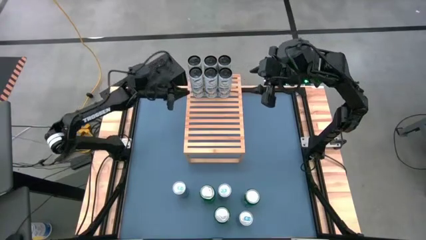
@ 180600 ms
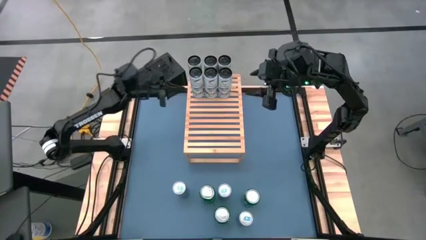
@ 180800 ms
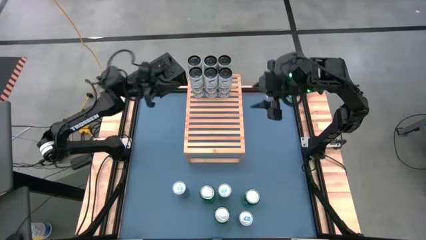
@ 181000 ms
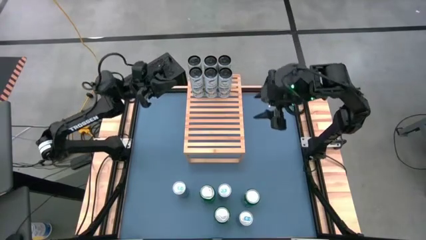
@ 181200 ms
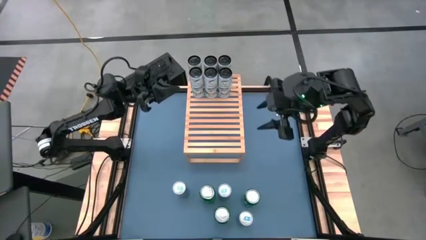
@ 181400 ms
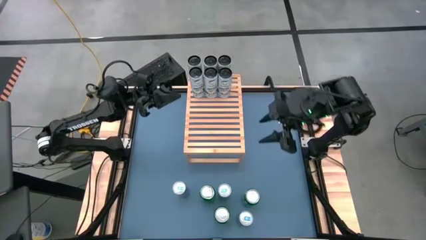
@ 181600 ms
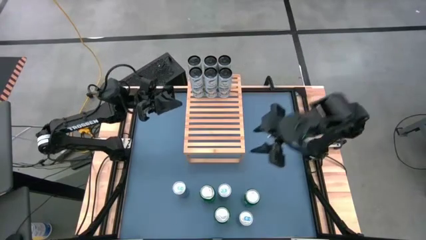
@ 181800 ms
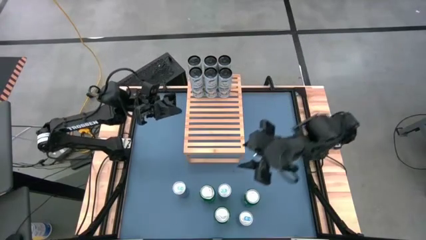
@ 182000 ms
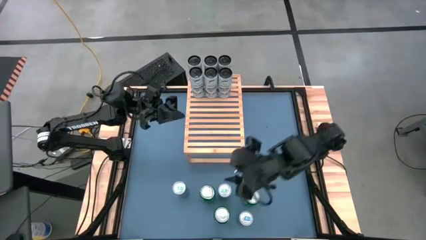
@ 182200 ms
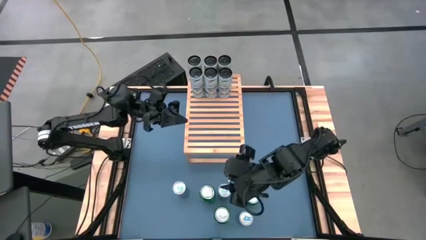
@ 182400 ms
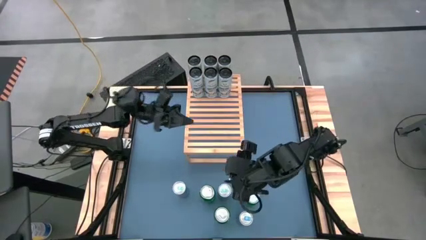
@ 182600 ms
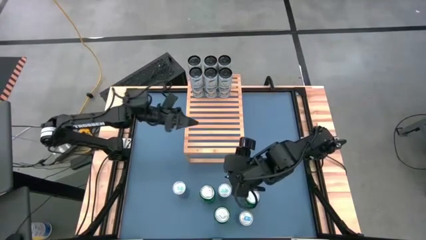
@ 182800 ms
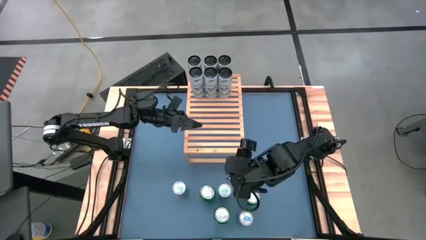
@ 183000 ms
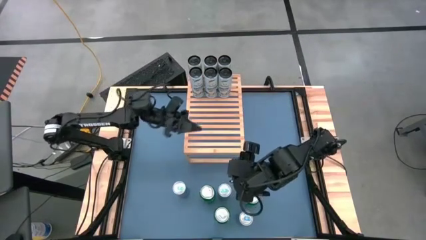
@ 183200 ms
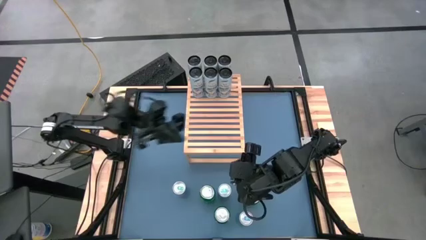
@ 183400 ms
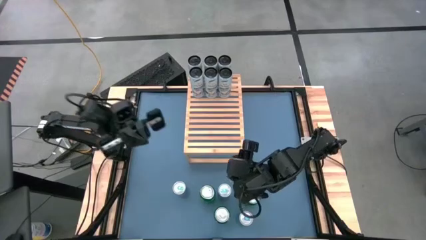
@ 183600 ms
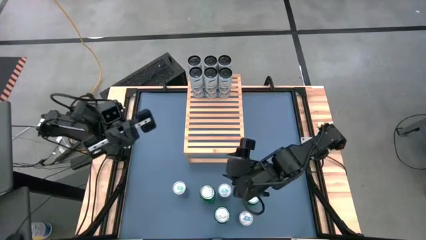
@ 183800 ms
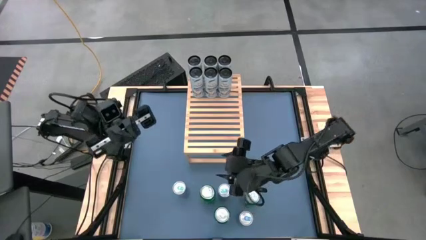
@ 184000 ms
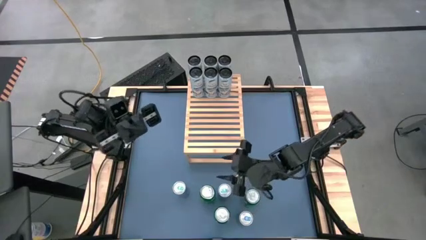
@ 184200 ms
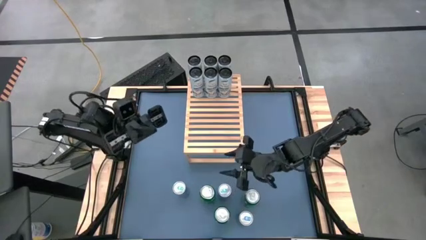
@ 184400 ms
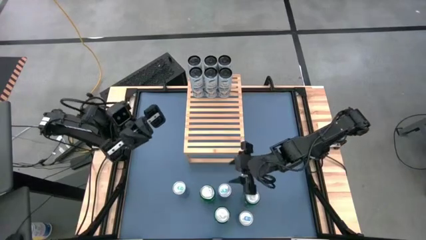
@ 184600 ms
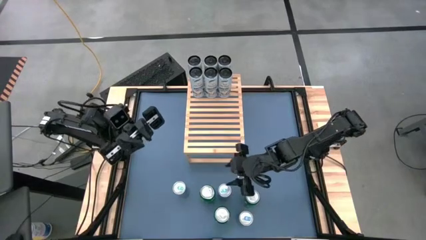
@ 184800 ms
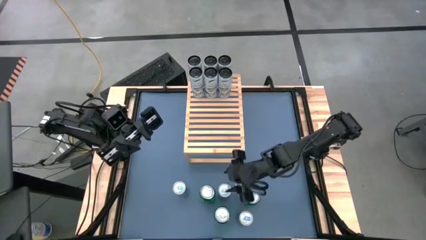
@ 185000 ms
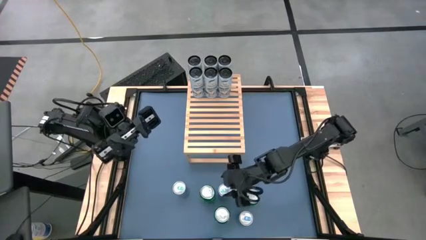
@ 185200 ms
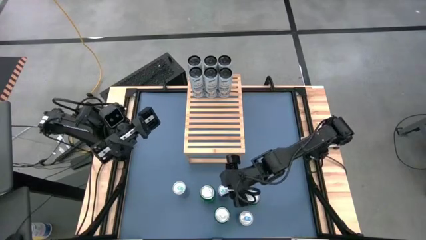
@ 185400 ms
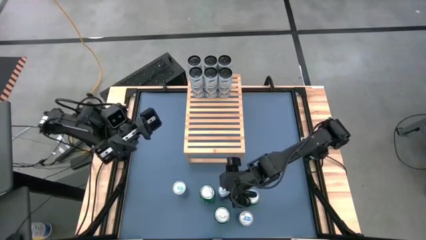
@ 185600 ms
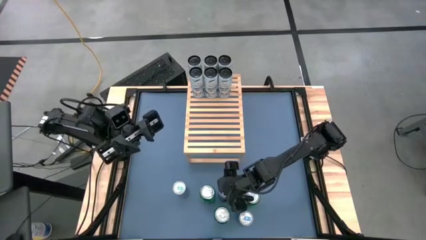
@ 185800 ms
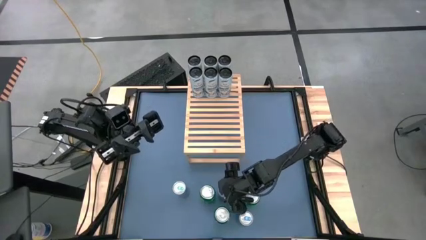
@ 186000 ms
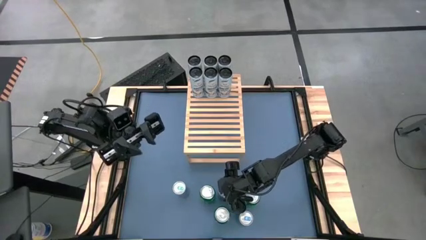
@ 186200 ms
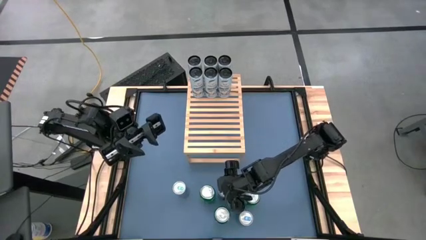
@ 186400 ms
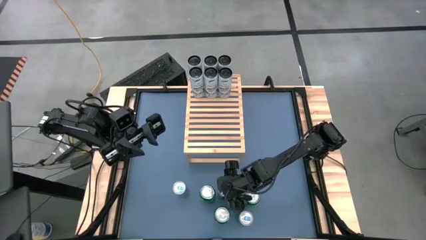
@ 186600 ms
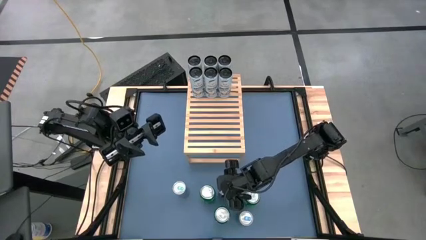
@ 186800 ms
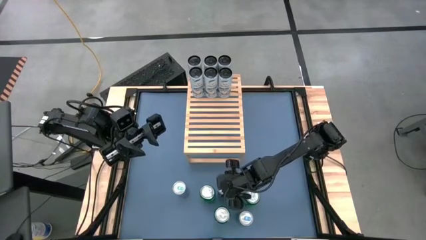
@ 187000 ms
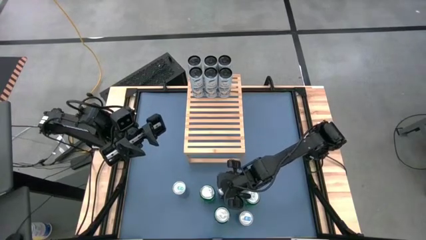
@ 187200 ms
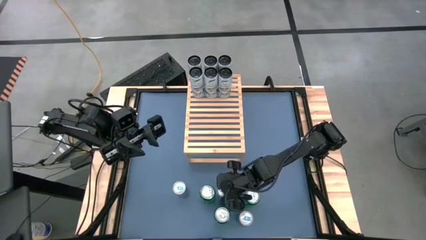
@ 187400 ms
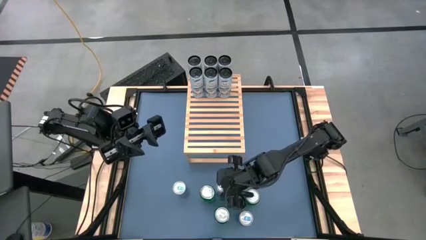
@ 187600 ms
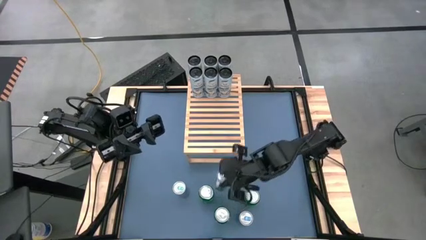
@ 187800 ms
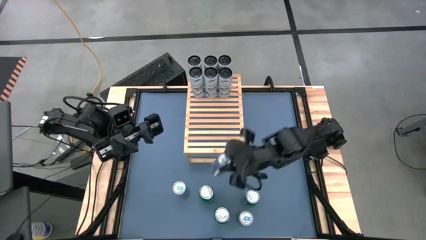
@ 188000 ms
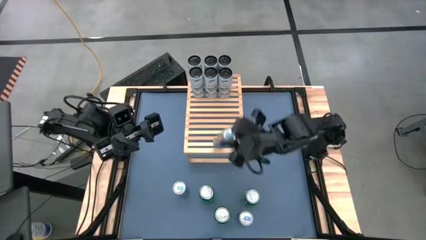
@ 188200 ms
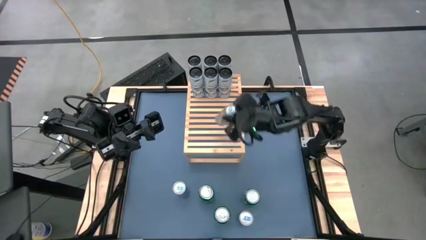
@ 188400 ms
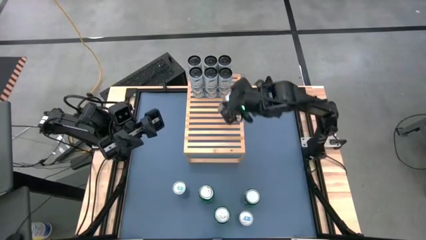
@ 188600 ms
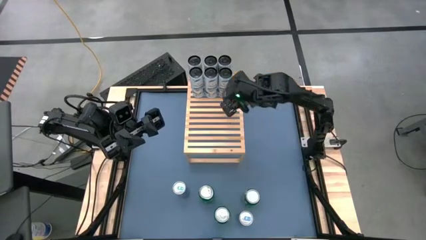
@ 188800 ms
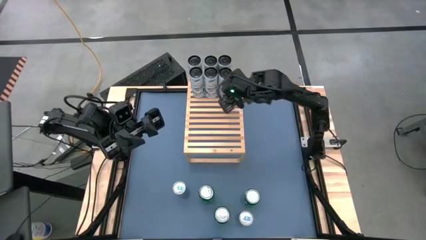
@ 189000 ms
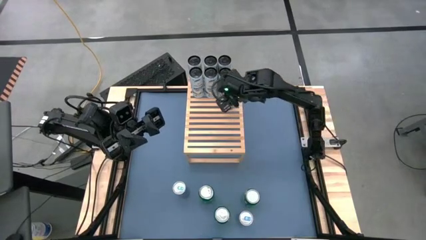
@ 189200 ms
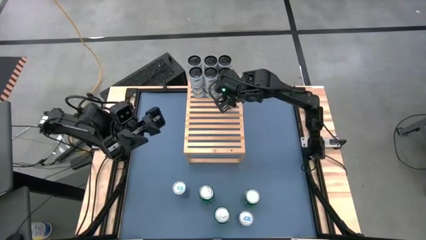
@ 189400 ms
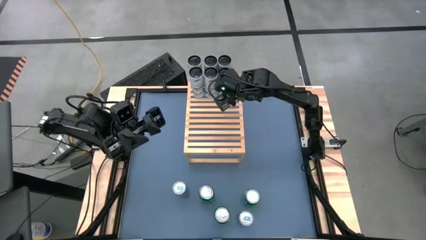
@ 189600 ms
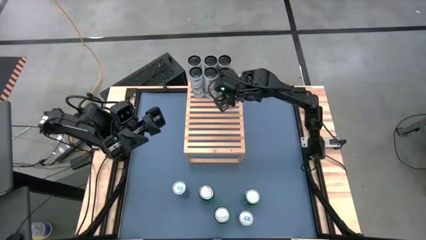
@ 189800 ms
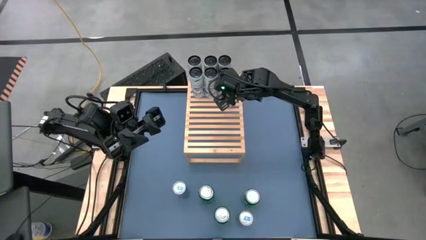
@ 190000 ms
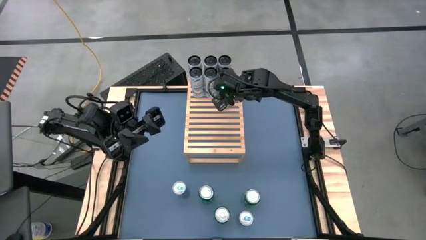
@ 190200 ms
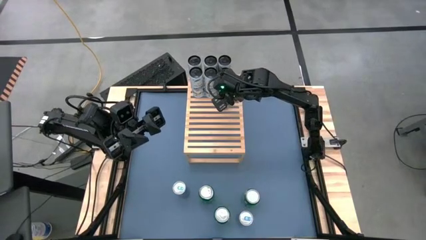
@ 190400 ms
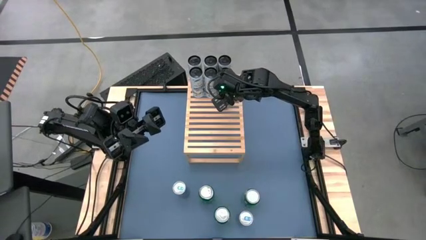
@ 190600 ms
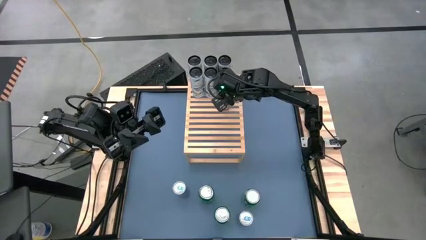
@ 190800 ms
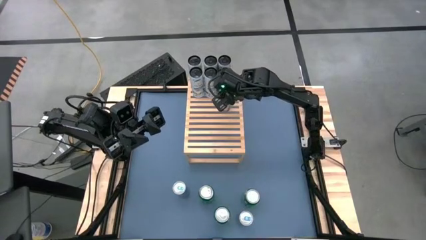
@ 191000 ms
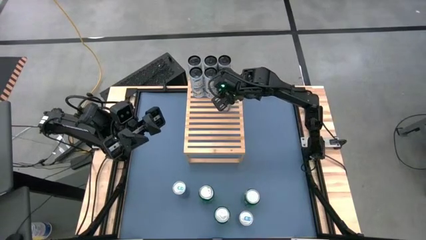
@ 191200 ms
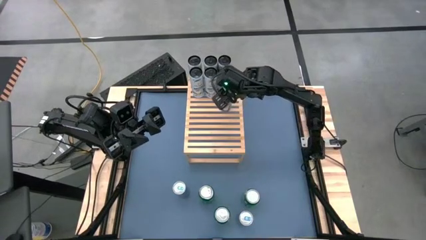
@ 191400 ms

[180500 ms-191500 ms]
Task: Place canned beverage on shelf
Put the blue soda can on the shelf

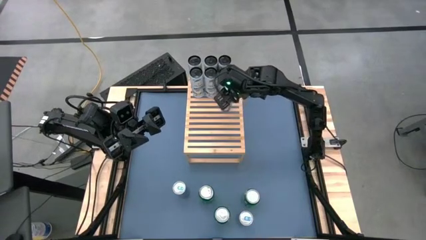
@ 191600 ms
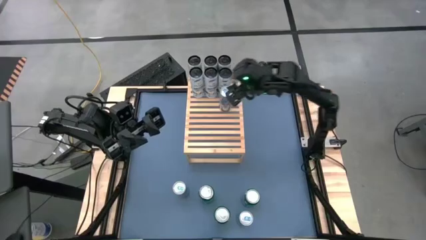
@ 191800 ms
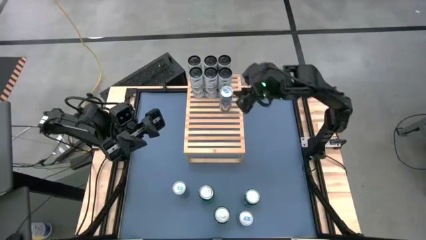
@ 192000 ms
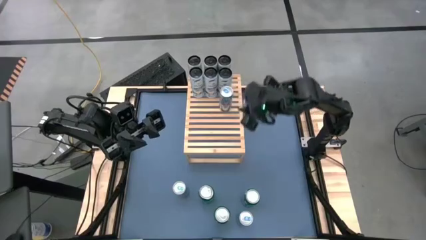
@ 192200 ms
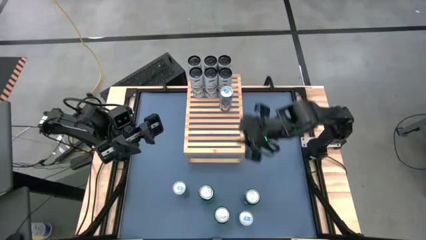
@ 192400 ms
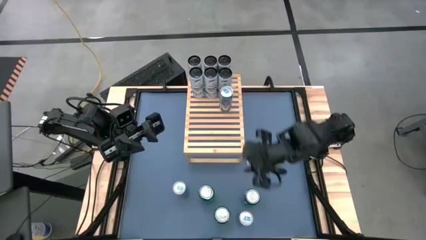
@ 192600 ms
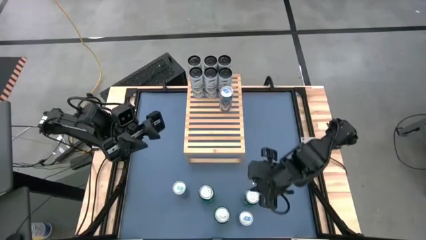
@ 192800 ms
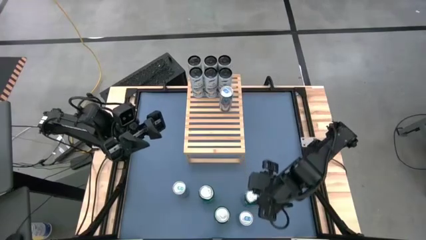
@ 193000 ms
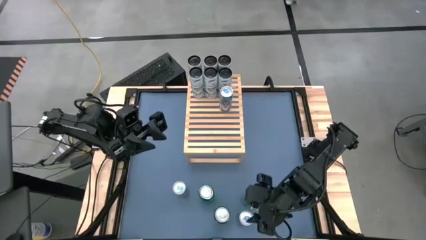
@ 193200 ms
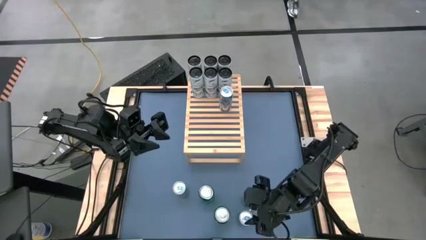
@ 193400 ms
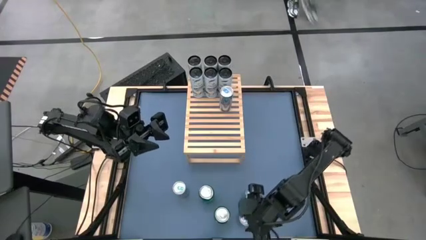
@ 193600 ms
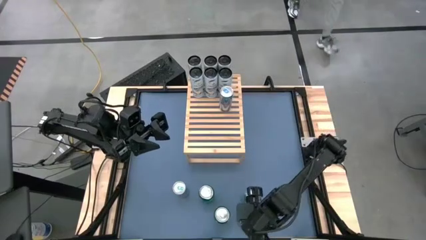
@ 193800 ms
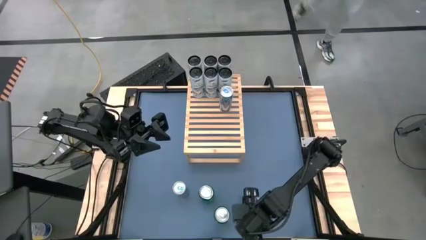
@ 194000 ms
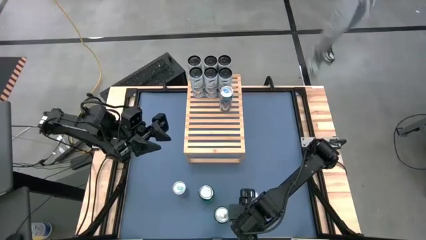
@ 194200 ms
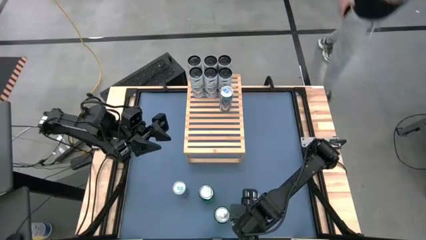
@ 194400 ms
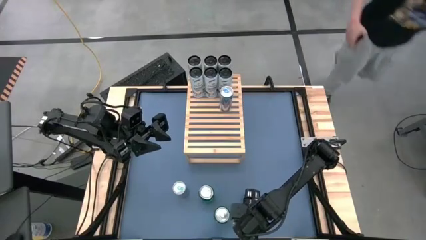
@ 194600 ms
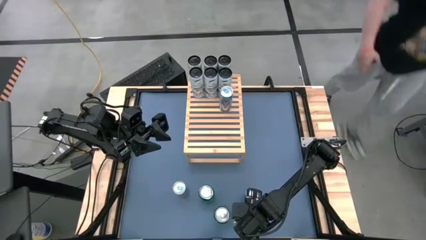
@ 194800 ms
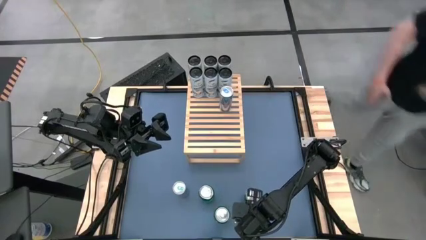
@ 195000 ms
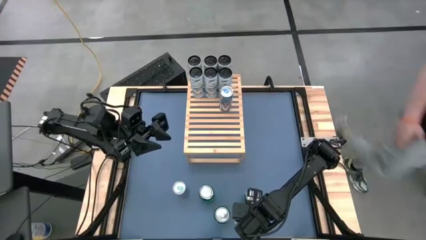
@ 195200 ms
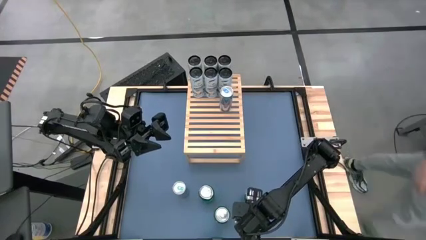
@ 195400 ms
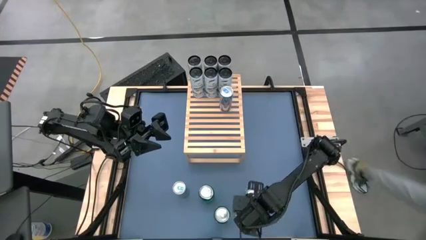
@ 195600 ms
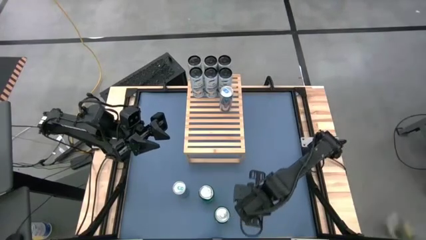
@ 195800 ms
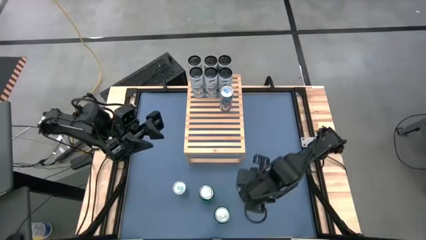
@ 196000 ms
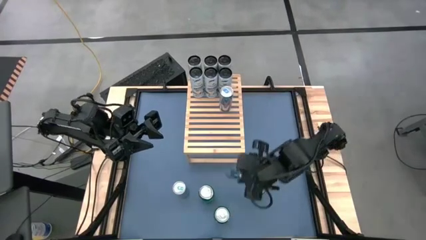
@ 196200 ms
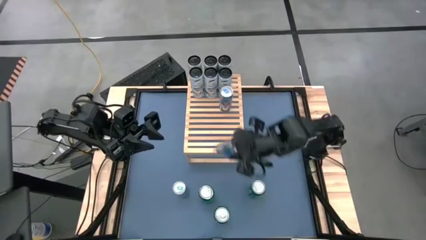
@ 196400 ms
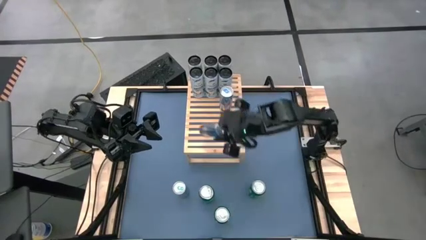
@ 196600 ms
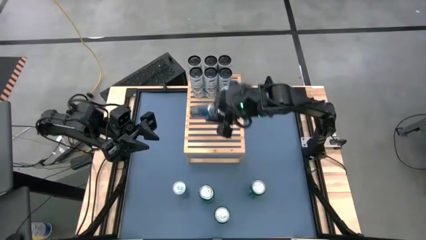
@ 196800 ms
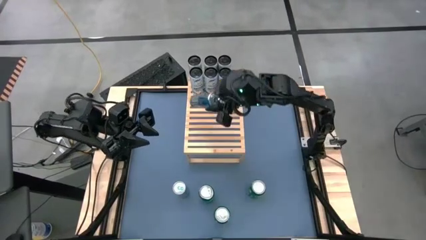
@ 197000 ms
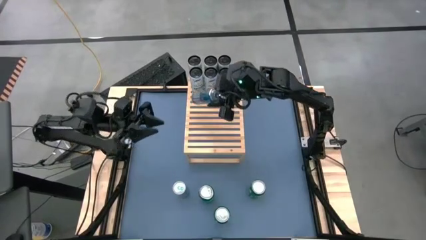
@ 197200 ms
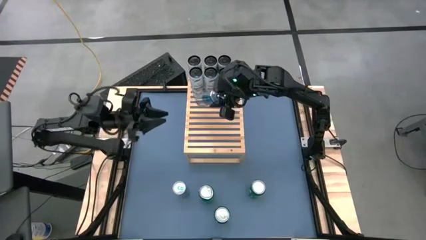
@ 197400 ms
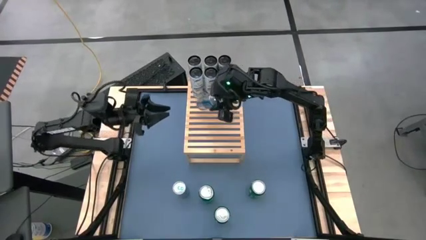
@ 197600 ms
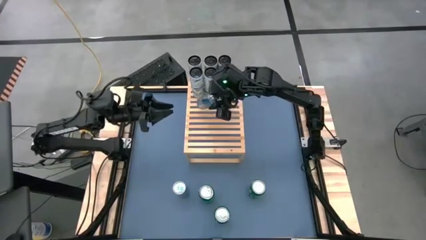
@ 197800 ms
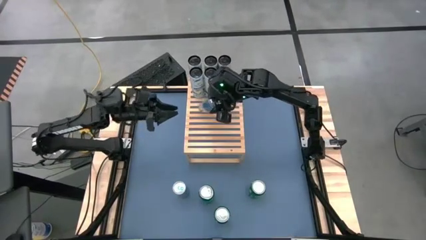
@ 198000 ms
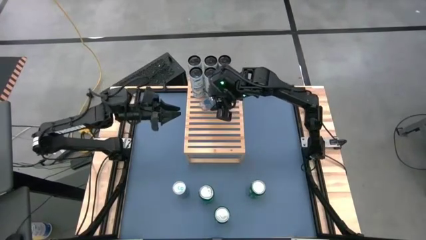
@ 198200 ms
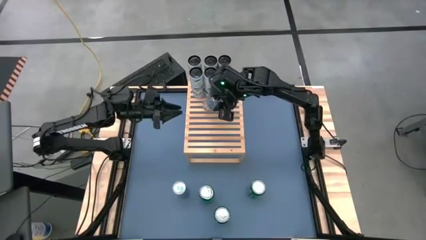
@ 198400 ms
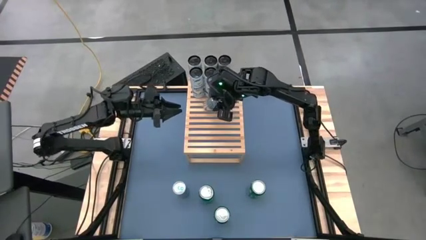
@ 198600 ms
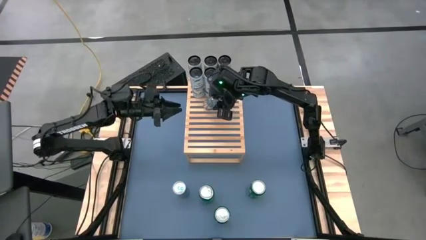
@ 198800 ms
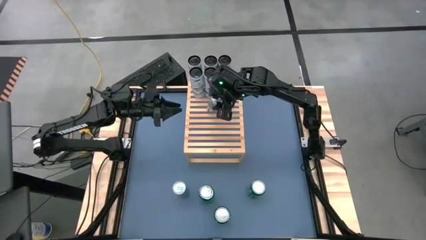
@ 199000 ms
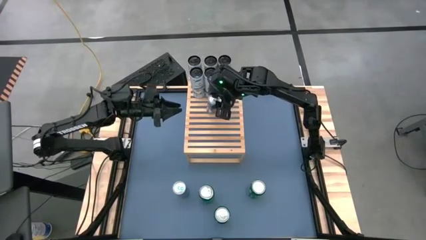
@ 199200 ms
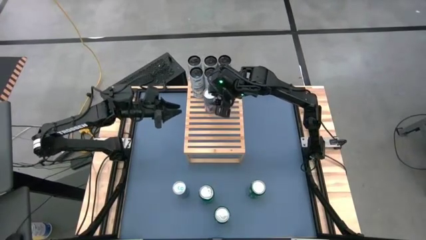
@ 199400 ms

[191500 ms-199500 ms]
Put the blue soda can on the shelf aligned to the other blue soda can
